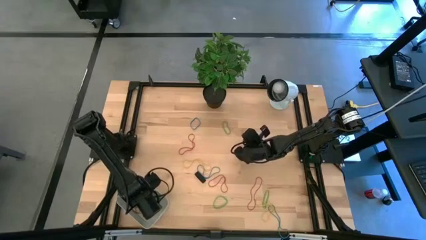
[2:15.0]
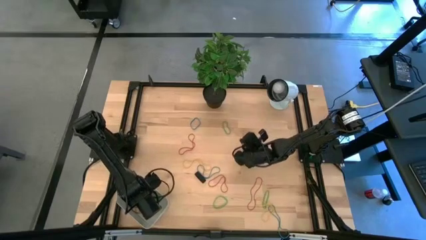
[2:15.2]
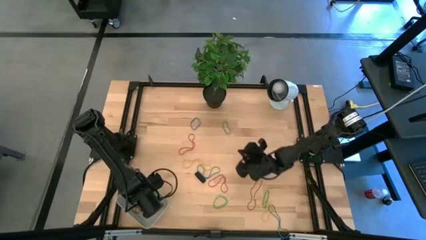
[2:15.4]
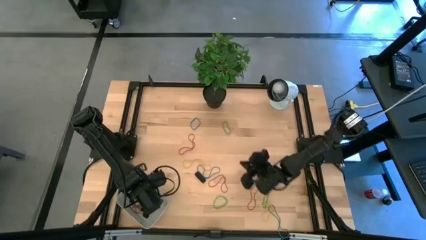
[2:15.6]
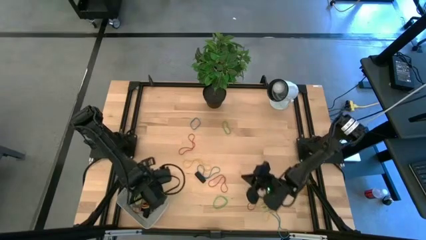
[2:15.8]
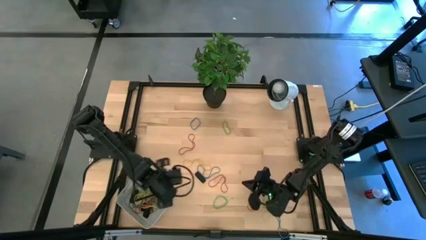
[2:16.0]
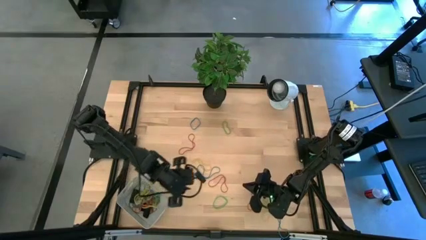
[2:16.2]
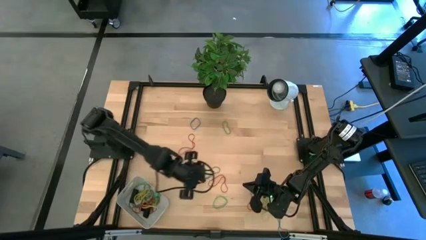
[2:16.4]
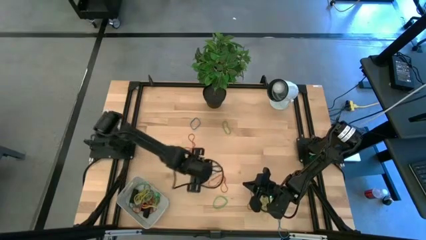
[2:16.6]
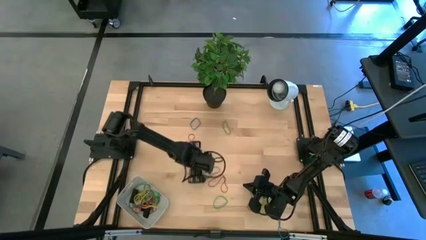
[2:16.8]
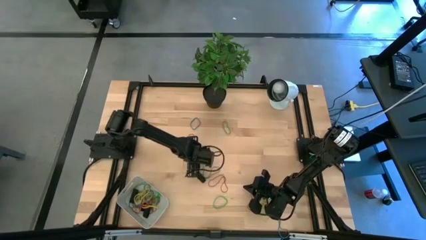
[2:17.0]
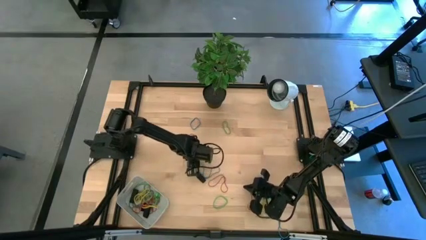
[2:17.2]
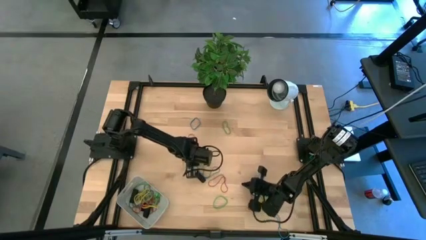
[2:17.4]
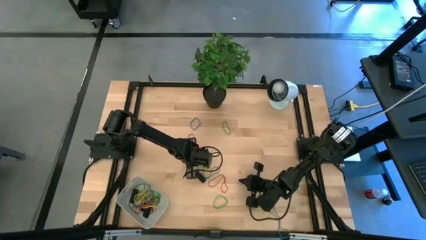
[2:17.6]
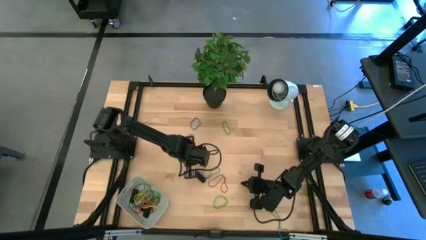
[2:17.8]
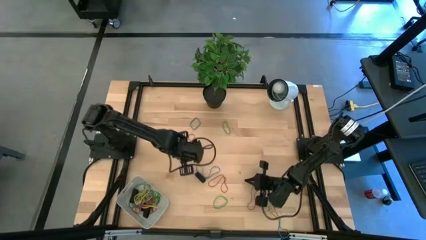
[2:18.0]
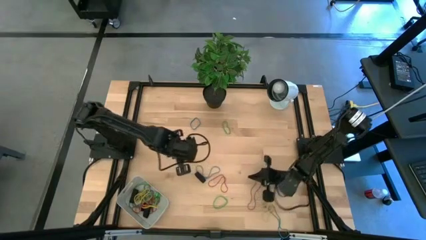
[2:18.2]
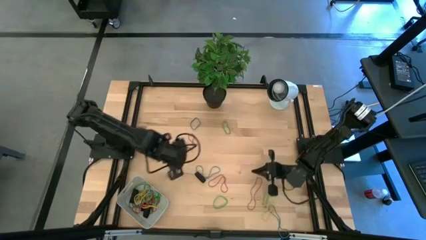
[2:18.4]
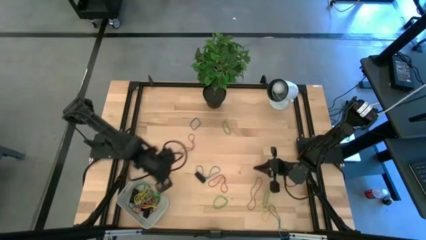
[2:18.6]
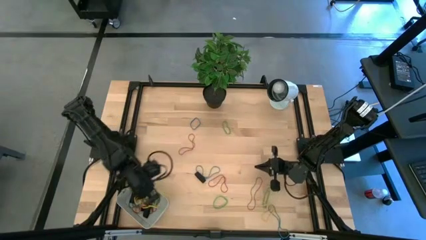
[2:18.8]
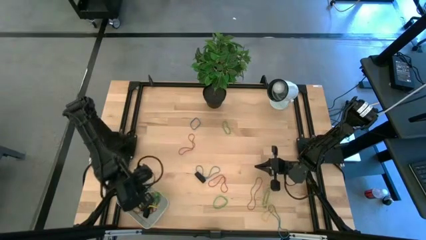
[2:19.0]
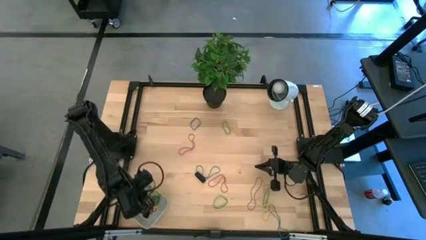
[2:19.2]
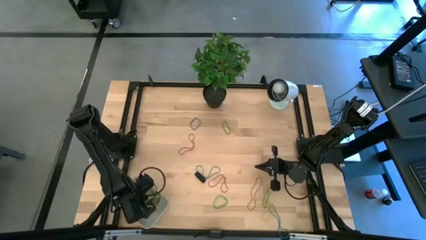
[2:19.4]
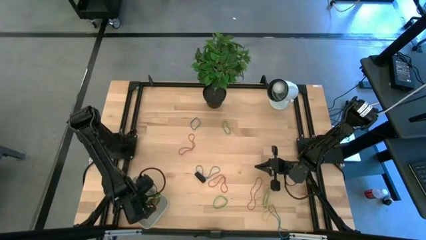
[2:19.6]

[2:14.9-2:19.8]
Task: Pick and place rubber bands into bin
Put the top yellow rubber band into the gray bin

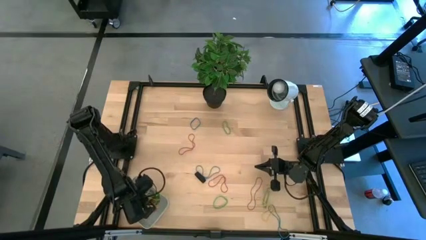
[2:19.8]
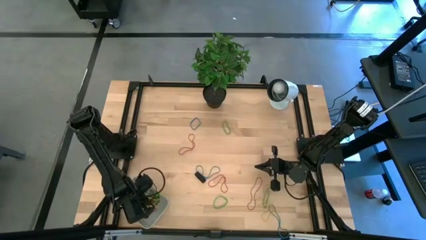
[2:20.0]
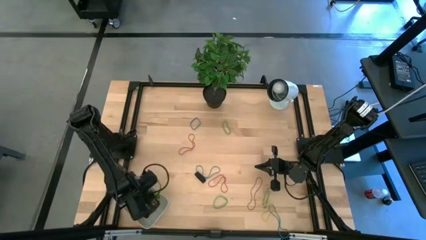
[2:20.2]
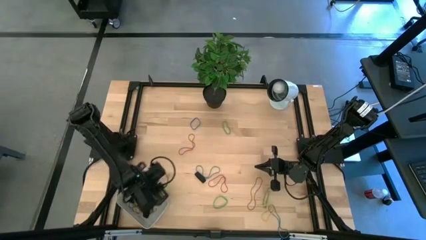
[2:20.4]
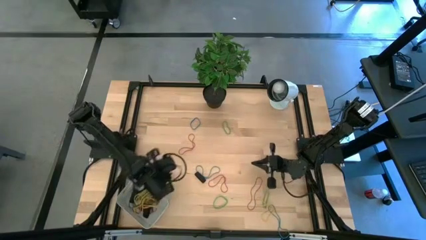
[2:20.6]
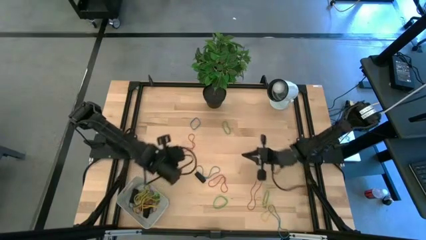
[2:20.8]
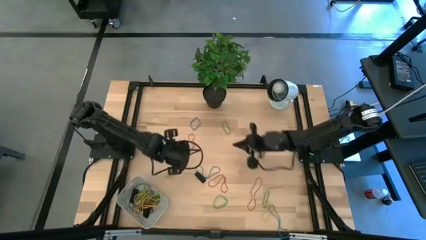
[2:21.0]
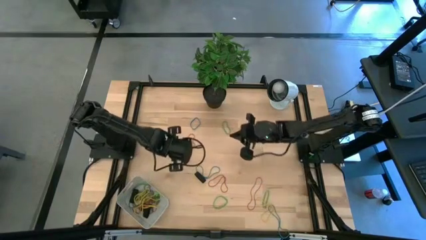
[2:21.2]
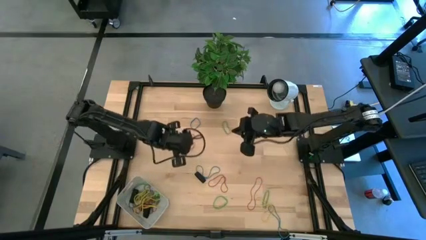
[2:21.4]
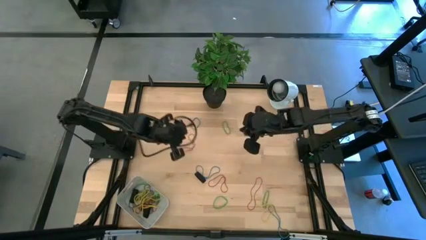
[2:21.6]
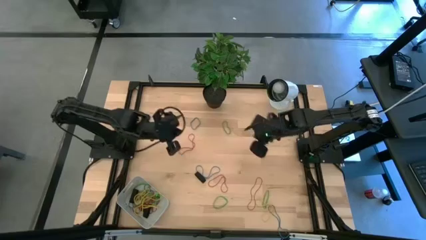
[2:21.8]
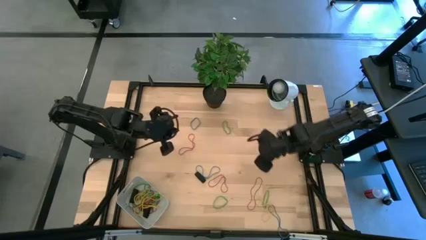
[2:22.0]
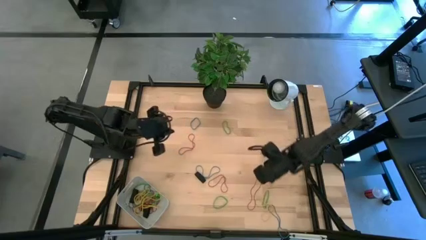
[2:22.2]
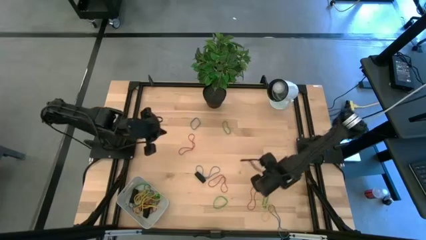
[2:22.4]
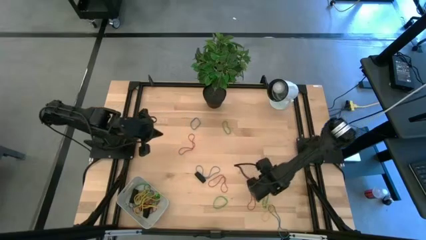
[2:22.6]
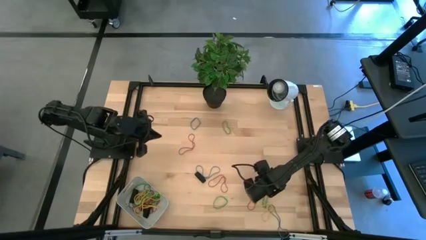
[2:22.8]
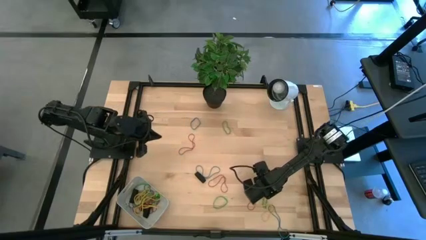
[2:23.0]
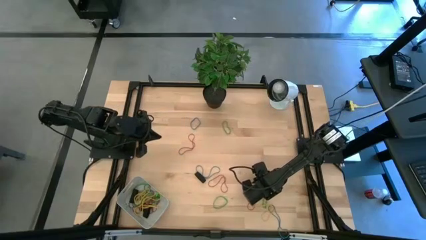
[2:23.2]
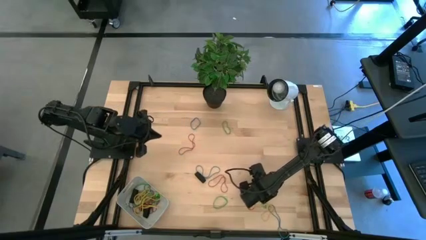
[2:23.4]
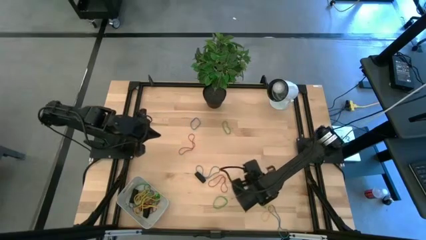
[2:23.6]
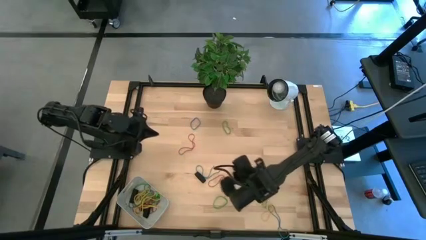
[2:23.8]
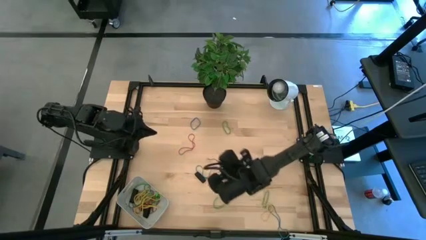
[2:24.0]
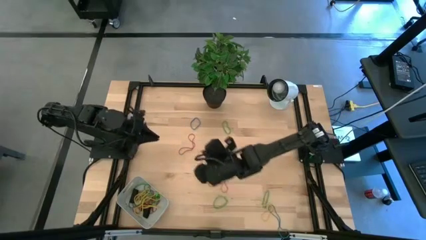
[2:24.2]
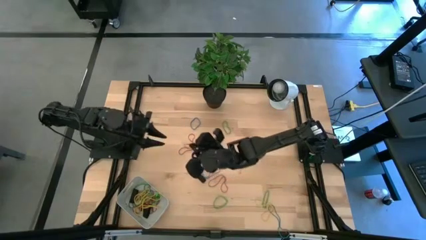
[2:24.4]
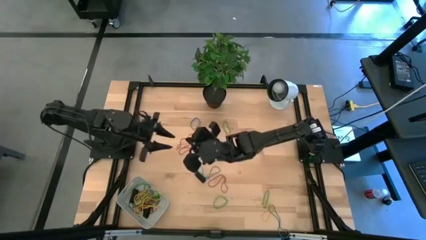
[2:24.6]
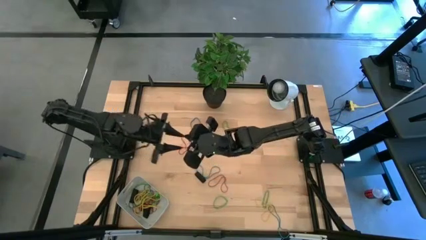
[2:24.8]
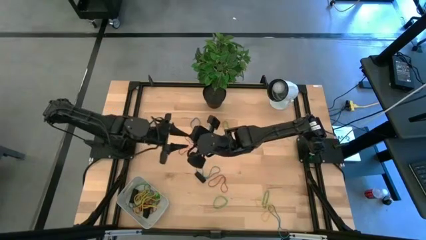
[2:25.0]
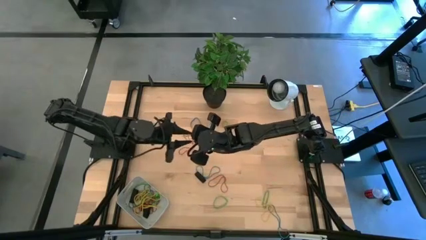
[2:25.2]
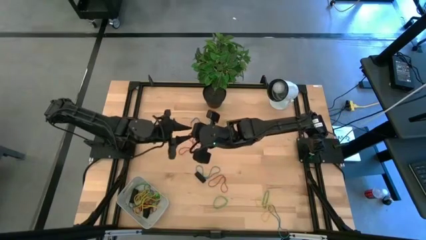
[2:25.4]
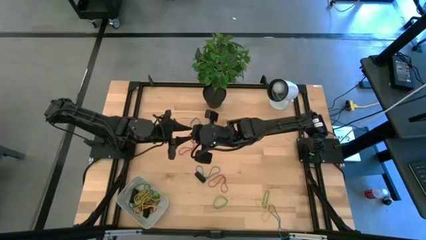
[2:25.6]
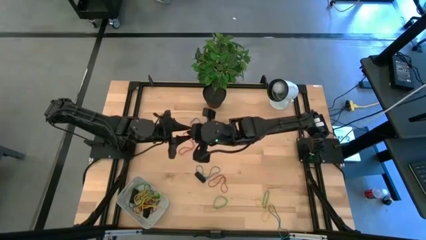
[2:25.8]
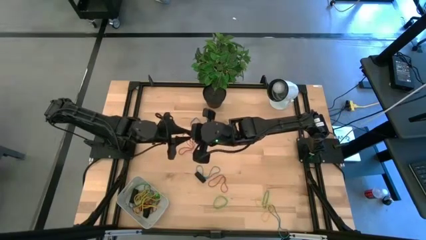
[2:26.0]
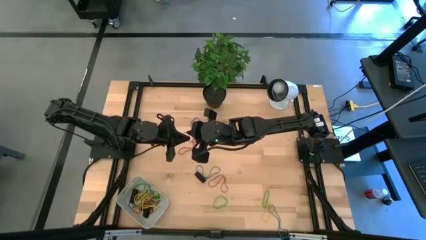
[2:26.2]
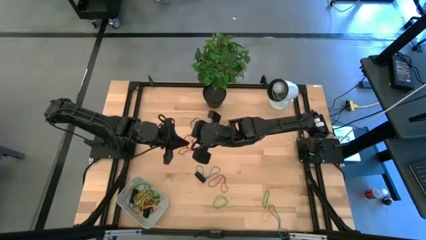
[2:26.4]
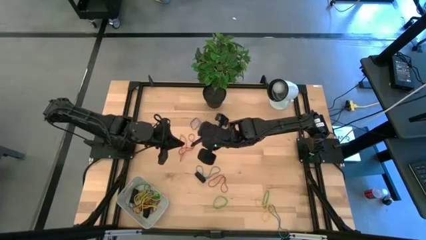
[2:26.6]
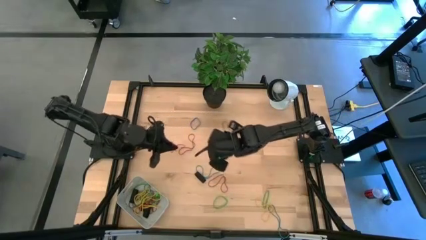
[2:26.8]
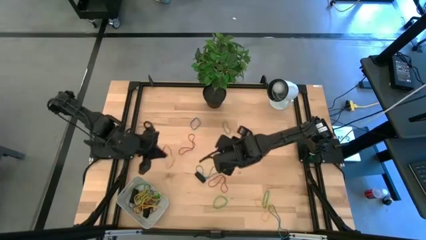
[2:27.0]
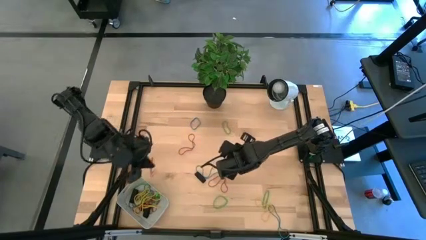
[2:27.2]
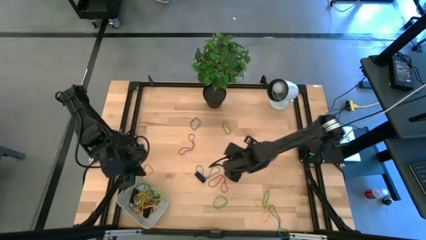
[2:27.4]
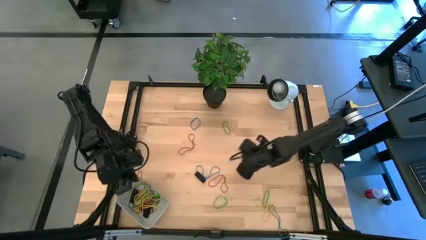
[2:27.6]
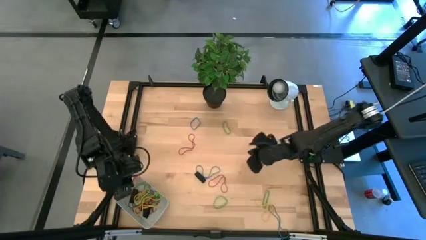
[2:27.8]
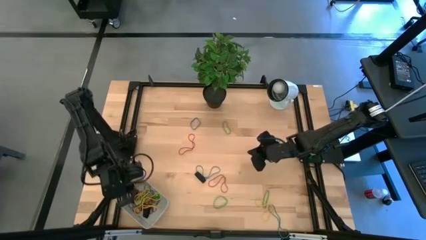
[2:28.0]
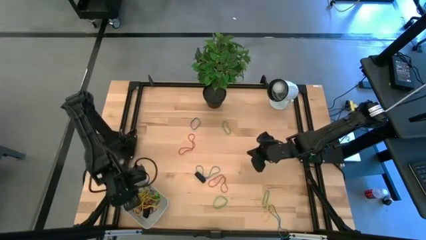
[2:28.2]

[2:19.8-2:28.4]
Put the bottom right red rubber band into the gray bin
